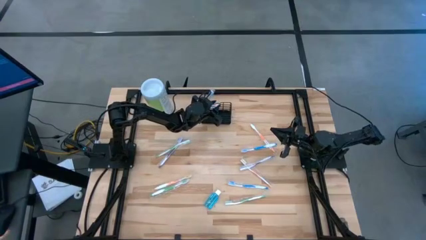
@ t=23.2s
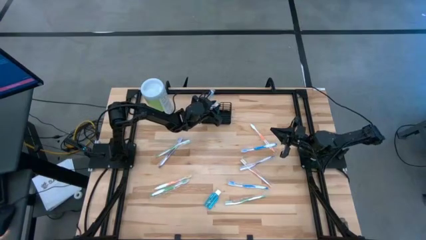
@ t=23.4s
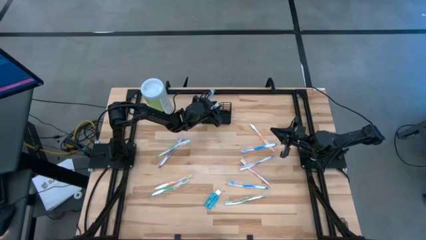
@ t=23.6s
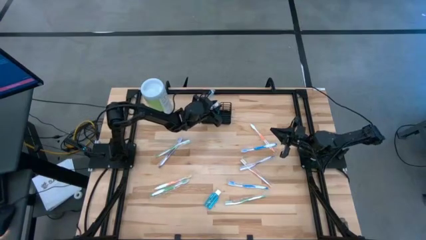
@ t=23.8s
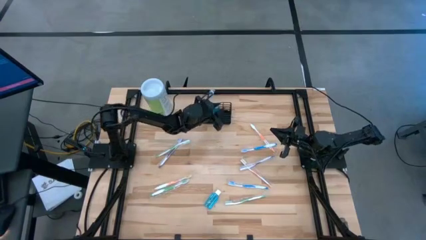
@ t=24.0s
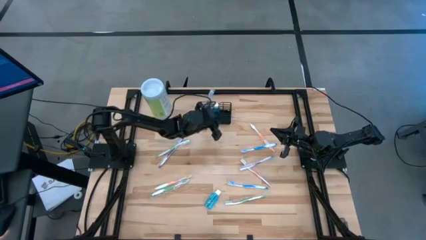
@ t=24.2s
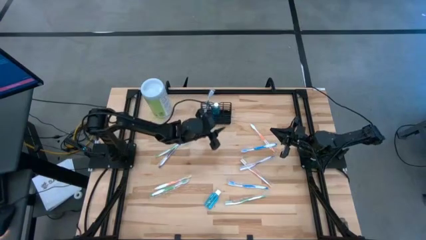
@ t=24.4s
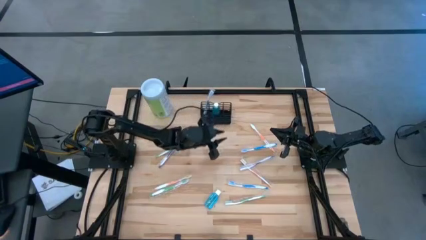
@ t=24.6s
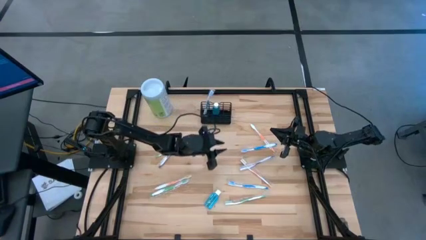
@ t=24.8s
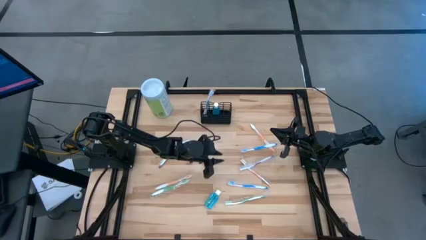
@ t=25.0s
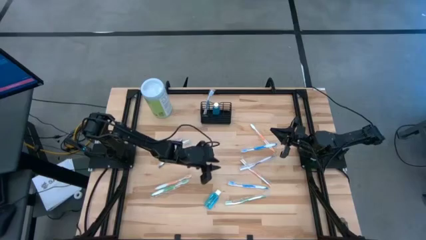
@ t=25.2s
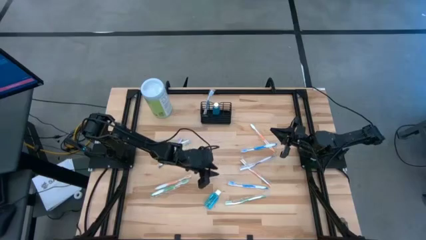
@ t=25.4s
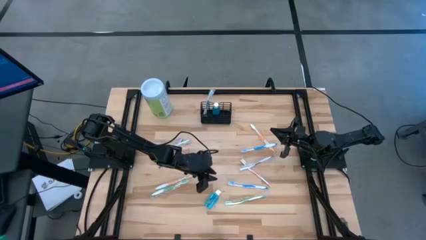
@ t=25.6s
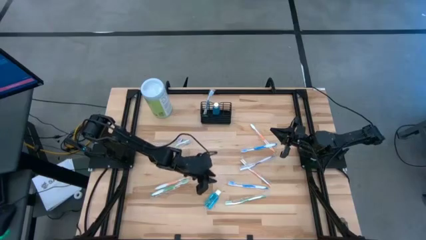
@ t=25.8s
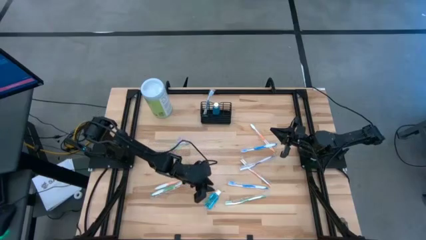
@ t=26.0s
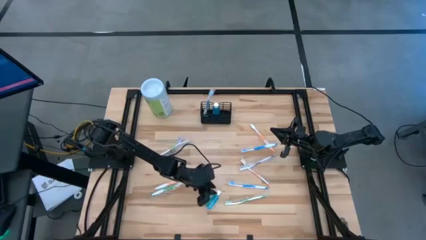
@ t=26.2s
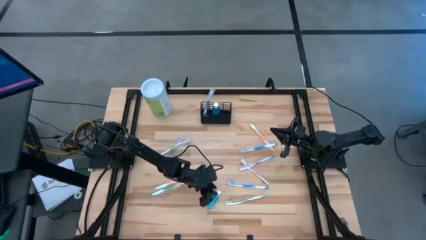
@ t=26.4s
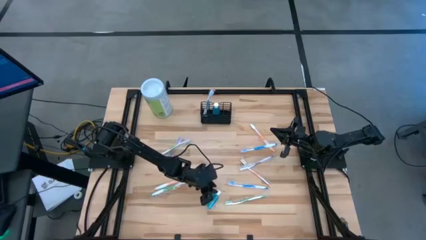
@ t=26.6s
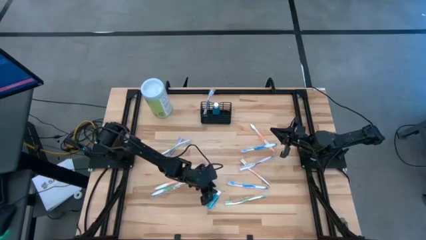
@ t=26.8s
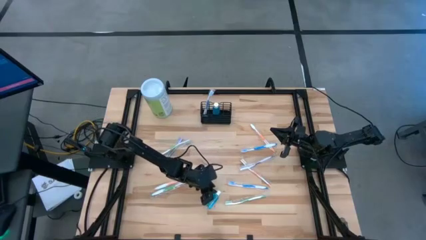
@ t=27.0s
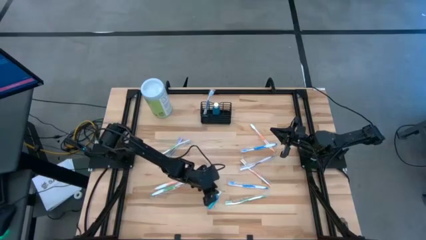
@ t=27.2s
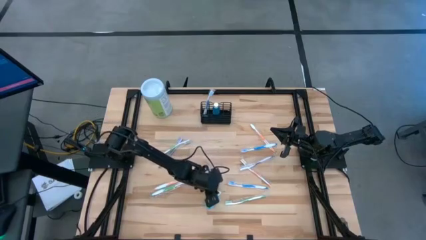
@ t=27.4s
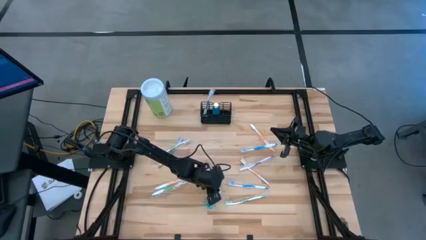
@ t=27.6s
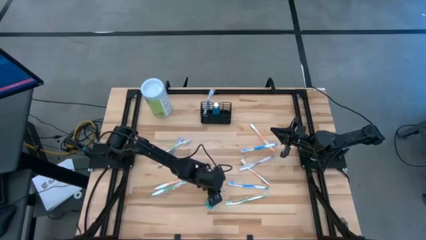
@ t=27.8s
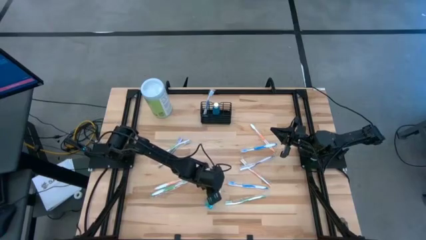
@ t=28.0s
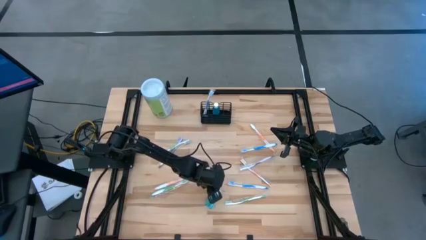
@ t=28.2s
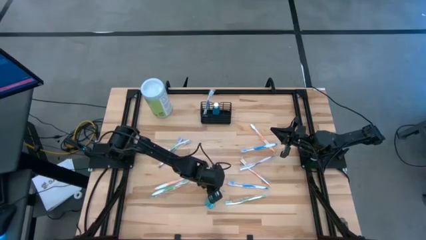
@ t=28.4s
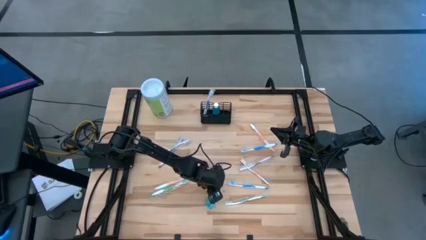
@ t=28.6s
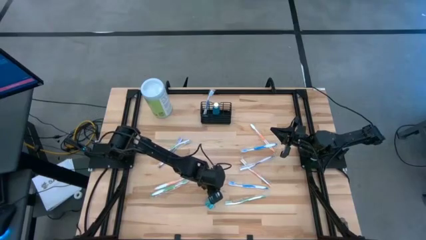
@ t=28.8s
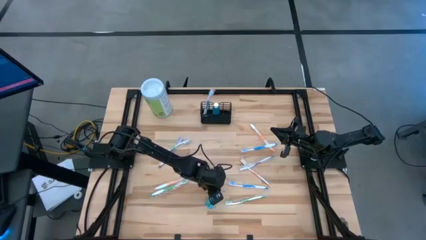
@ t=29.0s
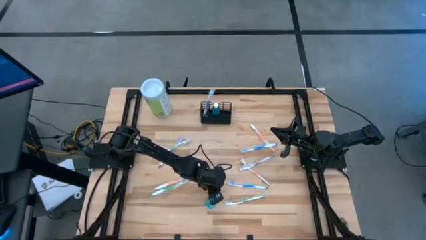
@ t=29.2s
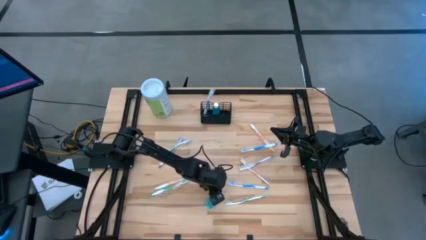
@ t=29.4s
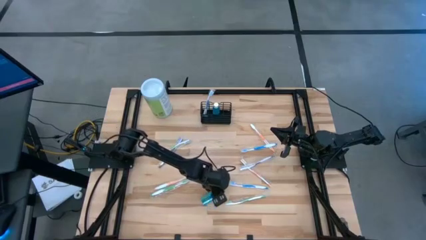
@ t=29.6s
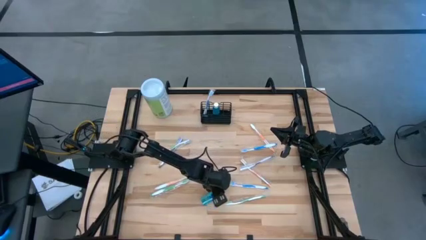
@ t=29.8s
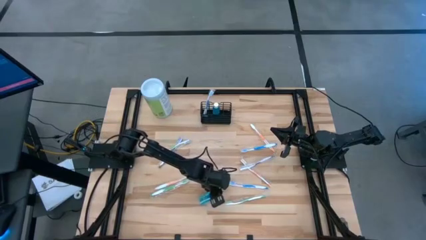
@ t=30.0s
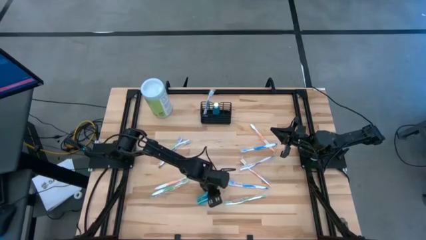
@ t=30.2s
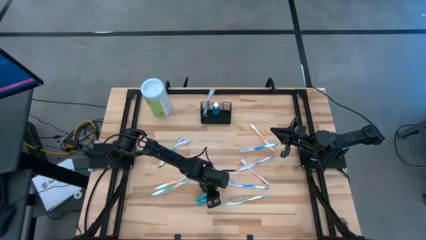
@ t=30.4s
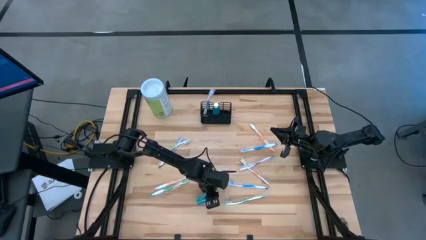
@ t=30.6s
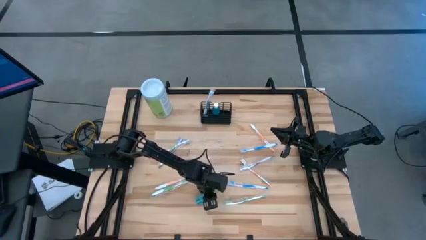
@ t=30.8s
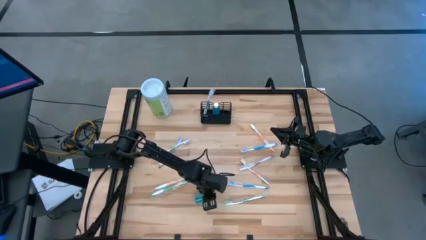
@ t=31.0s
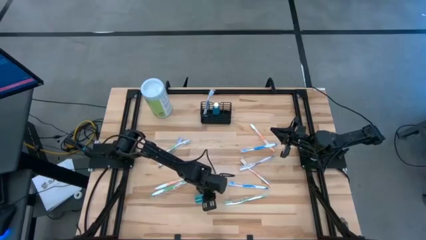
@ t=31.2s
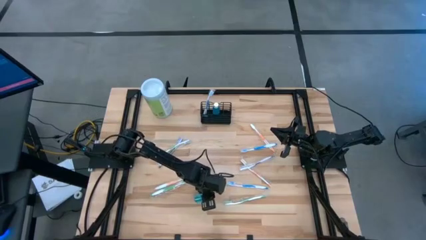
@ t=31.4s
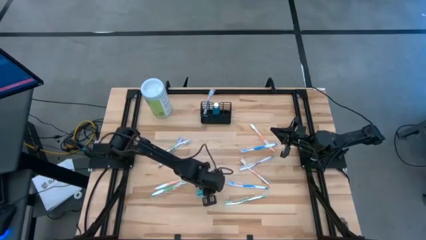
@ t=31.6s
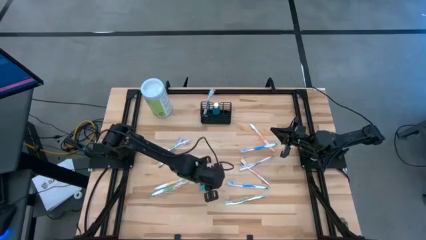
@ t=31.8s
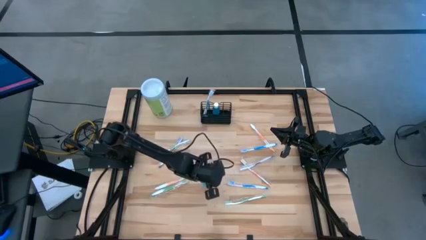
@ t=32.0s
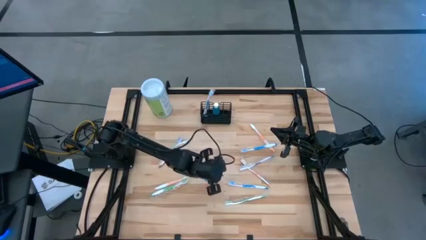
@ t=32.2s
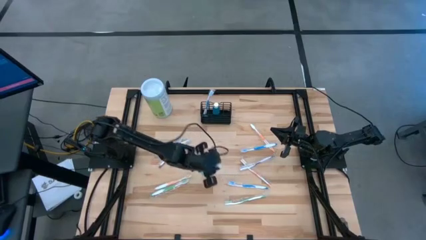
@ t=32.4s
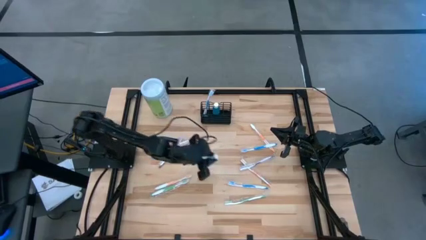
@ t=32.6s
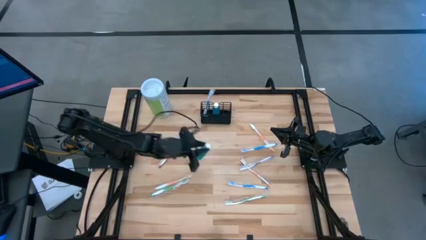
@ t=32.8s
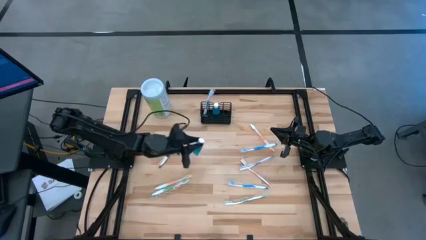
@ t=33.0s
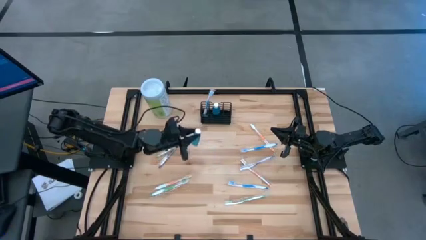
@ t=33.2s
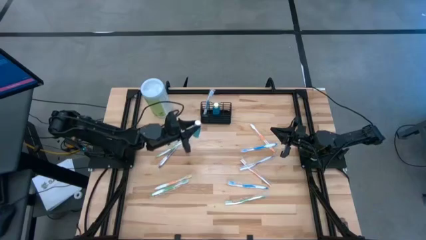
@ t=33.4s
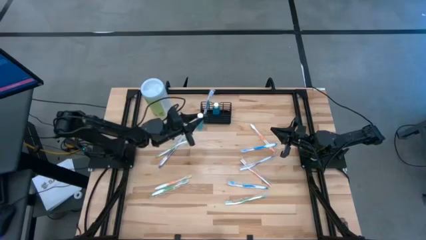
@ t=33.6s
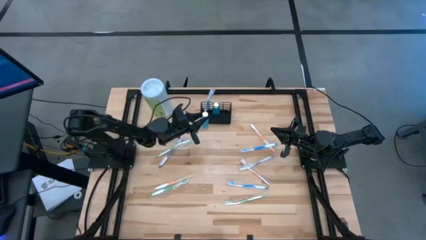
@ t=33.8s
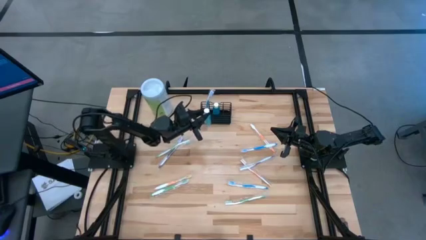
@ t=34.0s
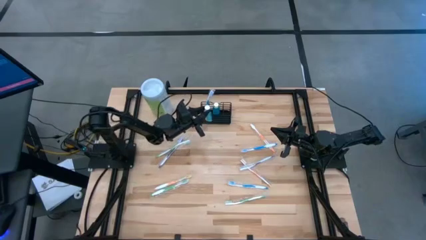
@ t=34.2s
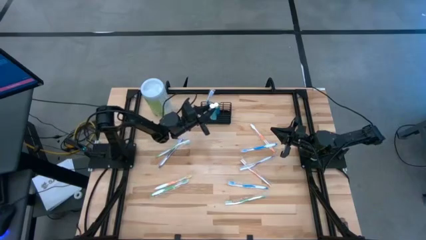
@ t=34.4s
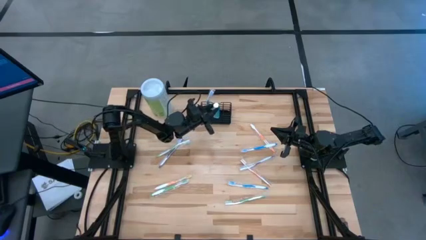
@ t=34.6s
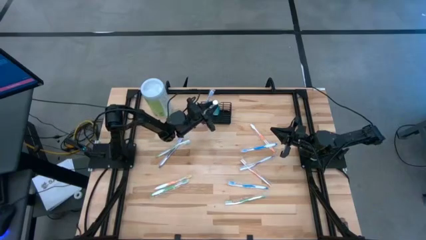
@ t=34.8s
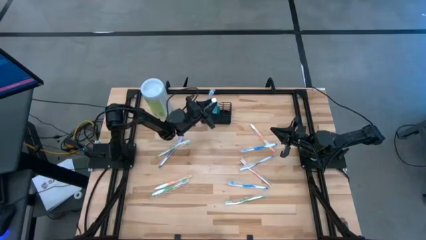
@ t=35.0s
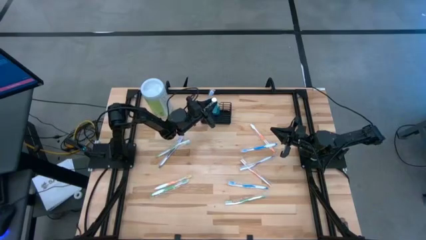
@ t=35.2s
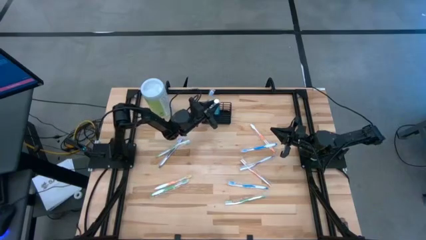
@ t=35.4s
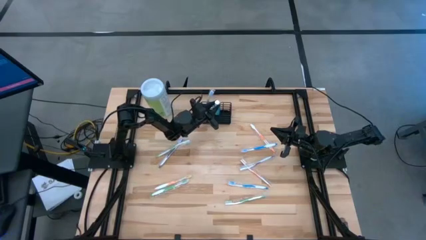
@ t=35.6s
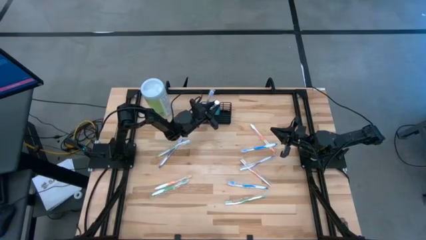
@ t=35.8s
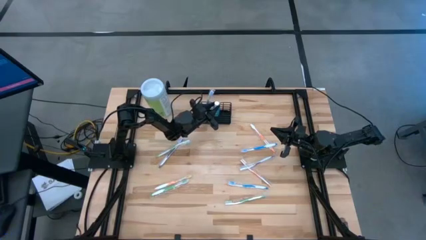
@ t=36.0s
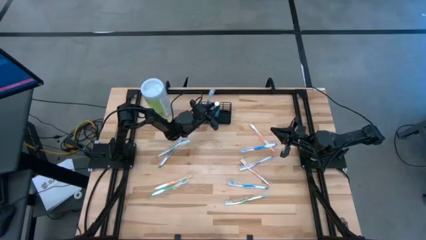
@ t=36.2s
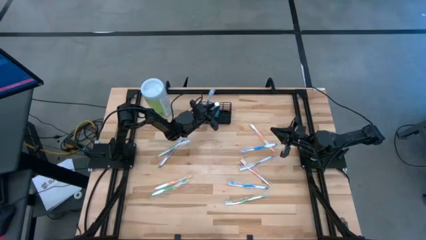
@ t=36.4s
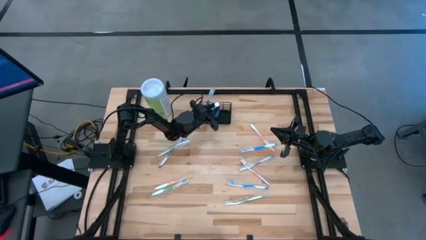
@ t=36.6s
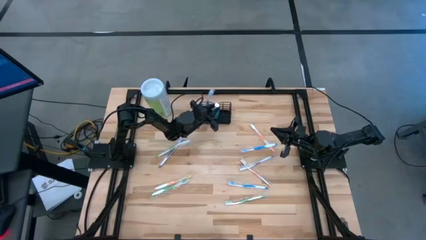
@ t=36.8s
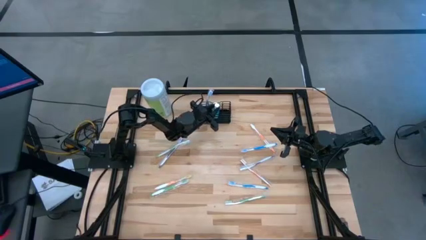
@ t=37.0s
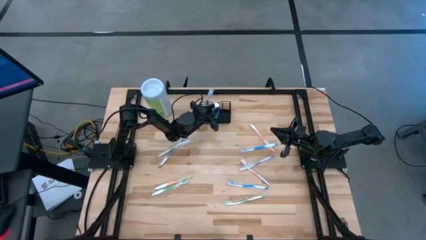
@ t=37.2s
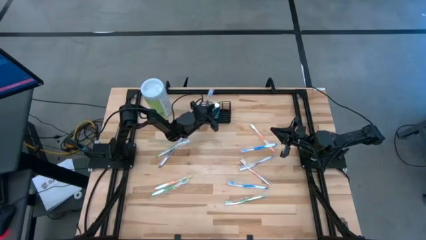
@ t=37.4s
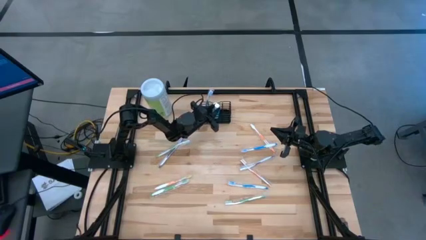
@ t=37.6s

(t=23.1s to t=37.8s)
Task: Pick & Place toothbrushing station
Put the mouthwash into the black wire organizer
